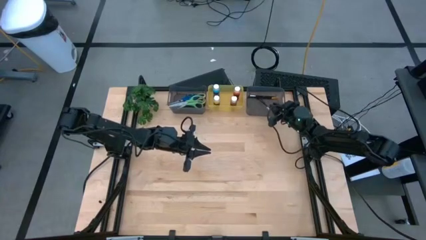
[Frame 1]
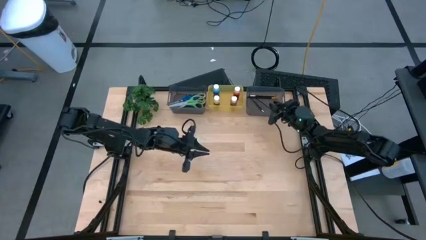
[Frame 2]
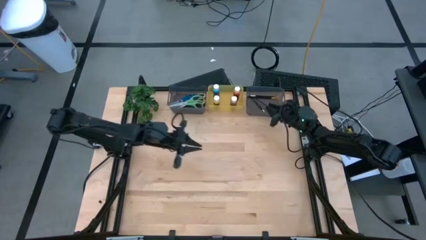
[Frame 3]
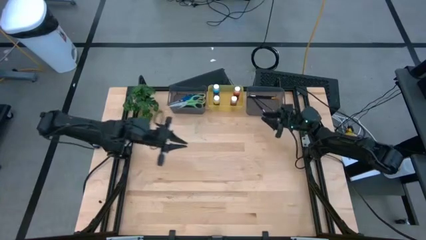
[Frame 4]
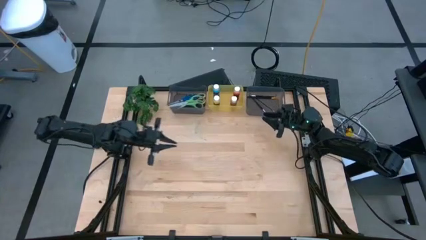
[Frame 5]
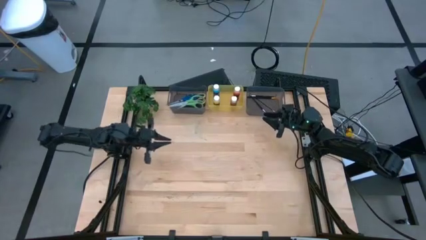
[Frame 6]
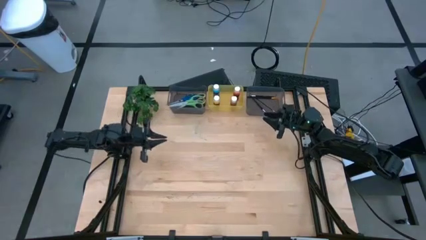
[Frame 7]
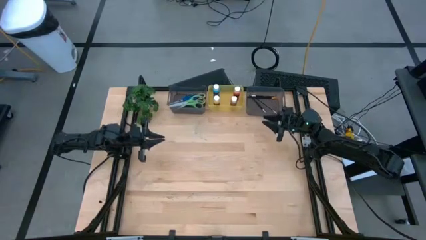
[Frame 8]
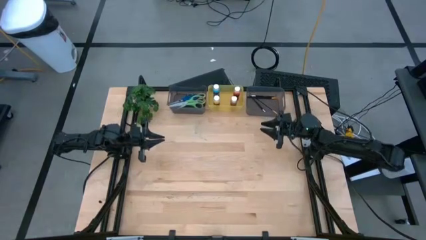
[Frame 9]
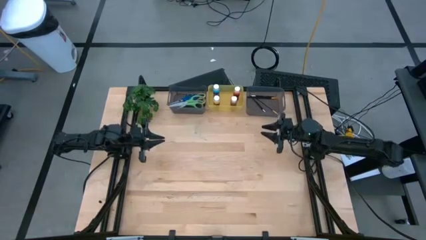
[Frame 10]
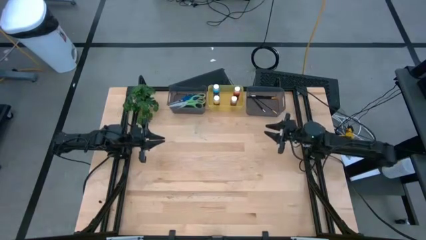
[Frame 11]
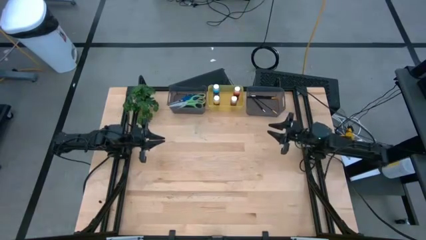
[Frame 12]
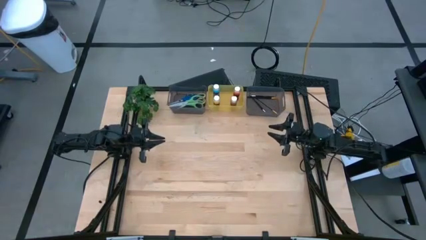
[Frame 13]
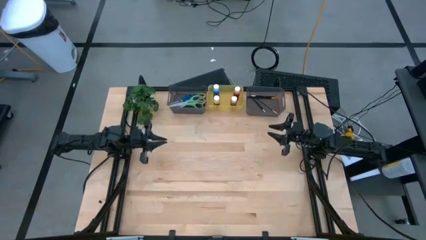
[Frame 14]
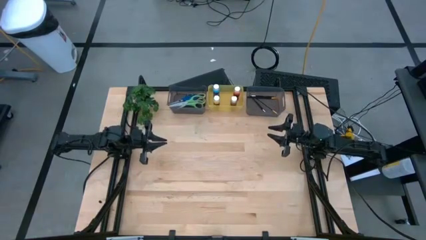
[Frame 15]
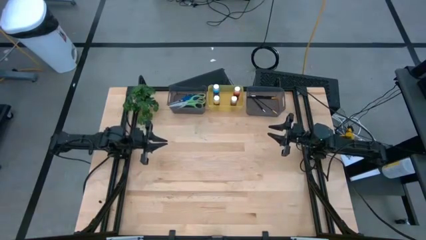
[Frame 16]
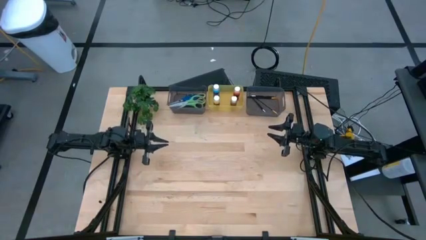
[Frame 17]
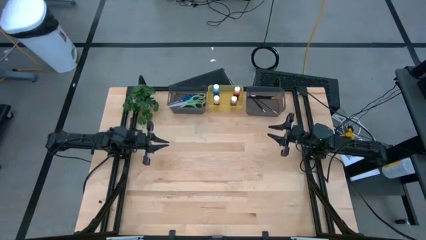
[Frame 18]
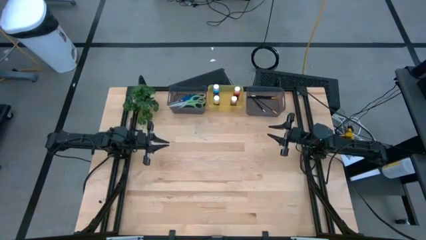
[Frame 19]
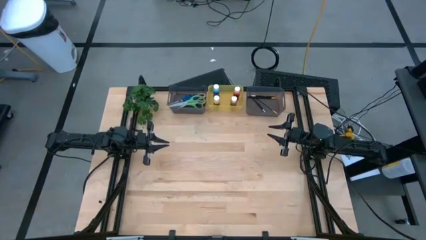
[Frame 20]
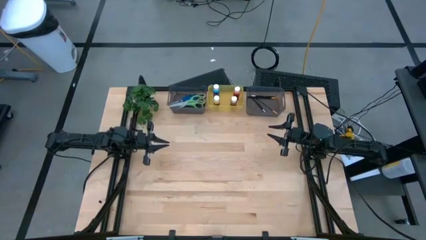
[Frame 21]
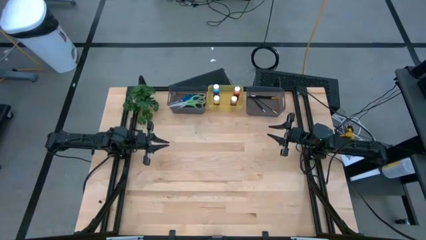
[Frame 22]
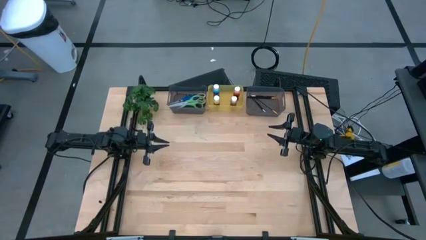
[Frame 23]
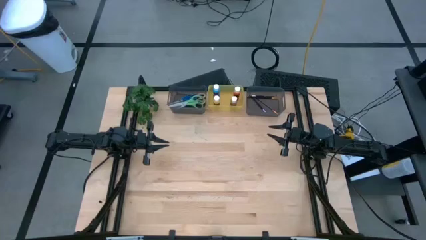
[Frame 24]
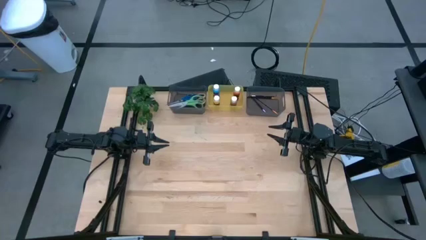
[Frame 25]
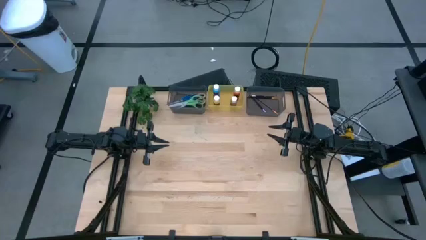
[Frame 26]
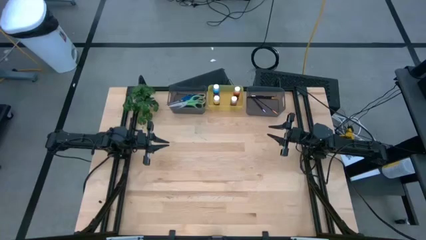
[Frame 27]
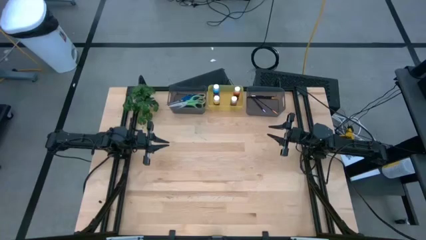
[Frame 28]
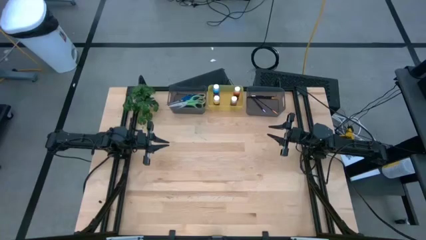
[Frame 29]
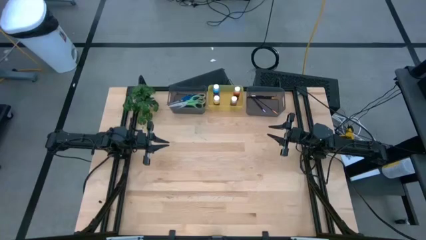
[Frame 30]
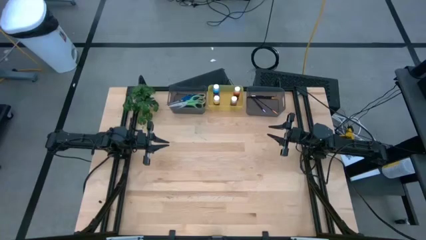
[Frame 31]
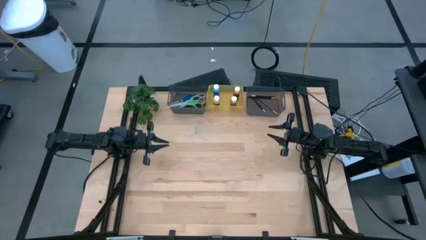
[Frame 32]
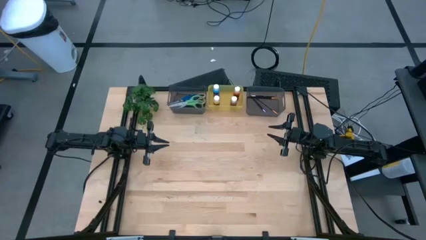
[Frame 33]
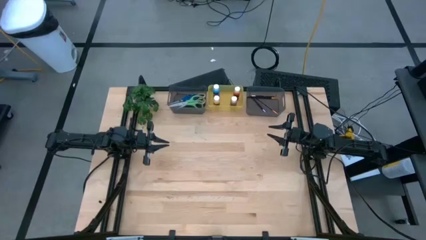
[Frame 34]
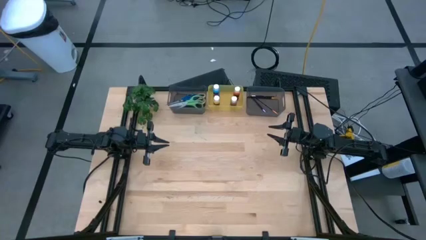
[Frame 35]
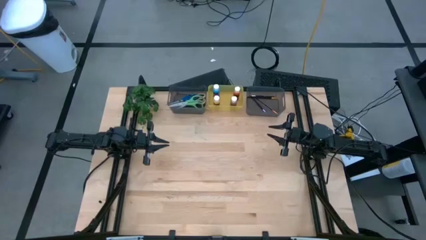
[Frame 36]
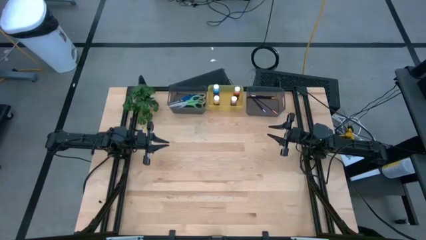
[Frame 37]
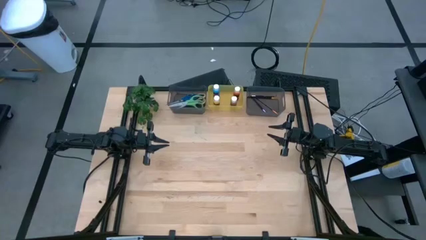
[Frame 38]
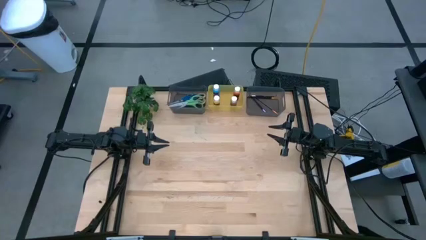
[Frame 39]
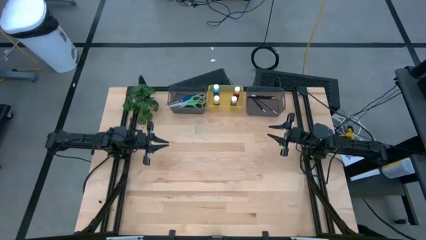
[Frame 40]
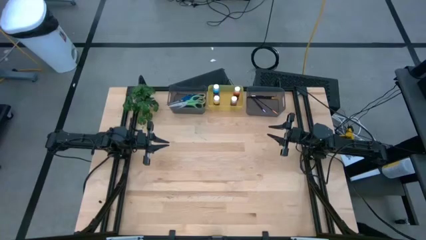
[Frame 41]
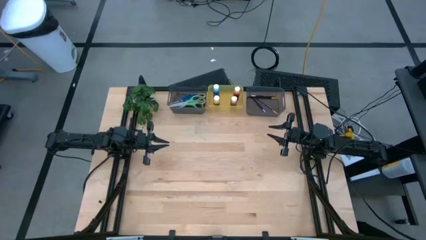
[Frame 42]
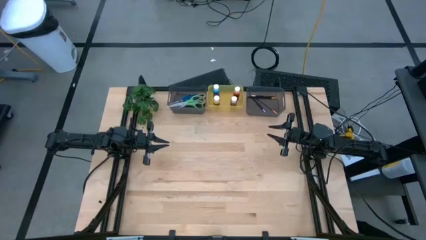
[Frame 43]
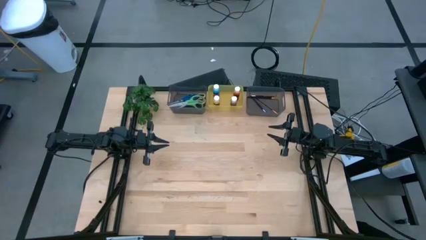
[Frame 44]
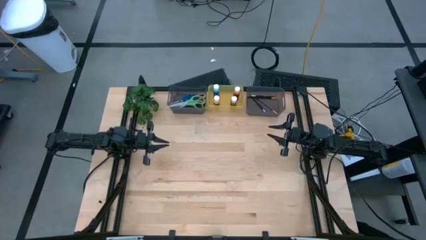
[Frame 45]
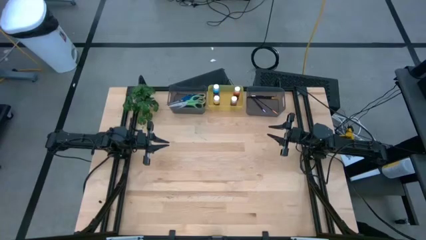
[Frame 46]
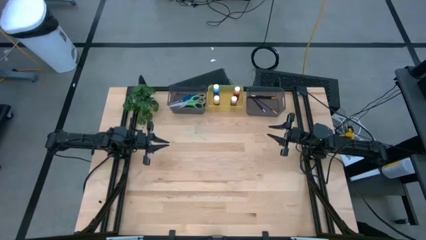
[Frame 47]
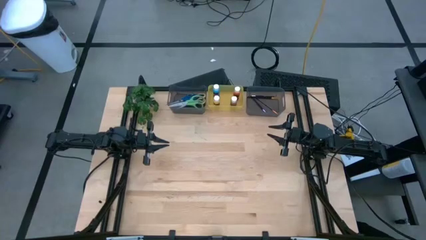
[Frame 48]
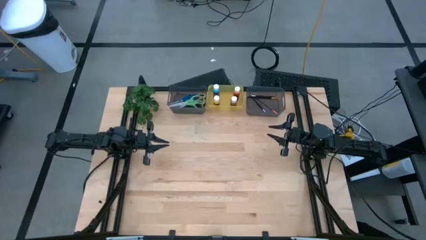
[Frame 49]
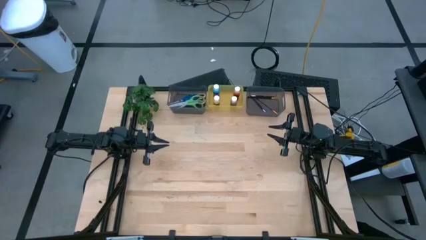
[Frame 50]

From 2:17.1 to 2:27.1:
Task: Pick & Place Paint Supplies
Return to Home Position

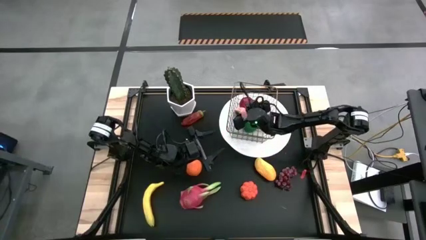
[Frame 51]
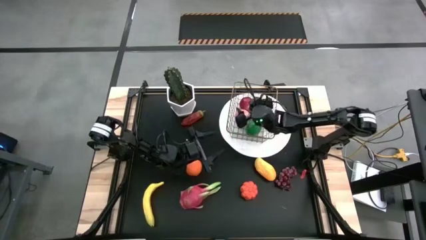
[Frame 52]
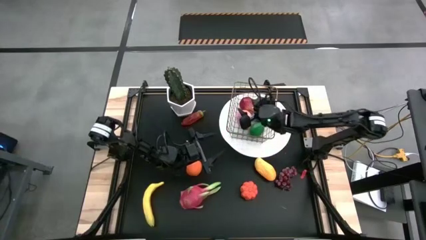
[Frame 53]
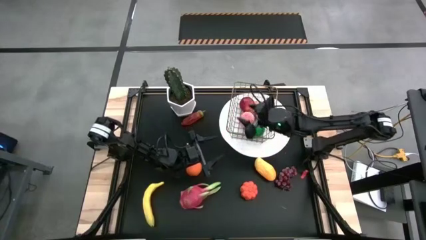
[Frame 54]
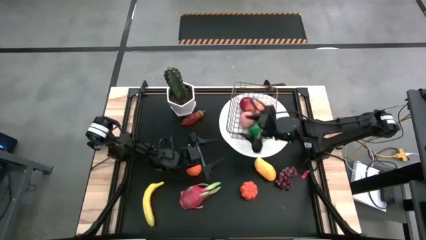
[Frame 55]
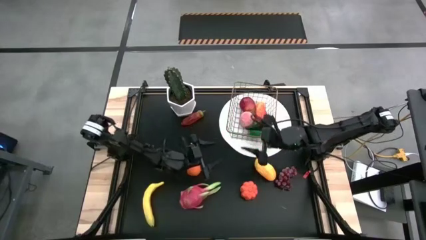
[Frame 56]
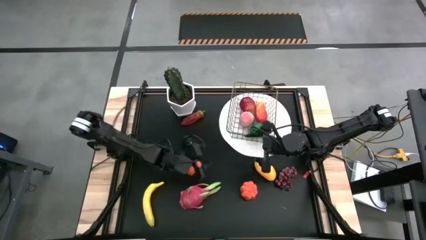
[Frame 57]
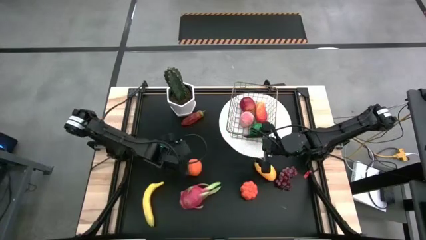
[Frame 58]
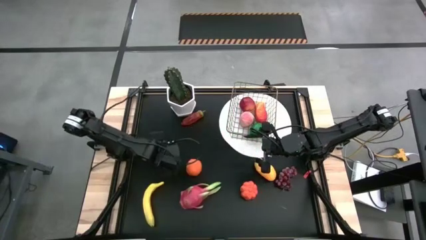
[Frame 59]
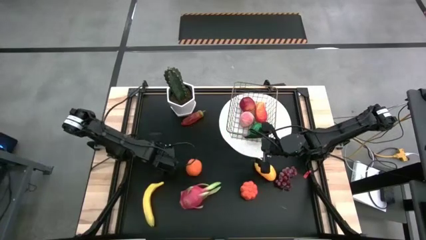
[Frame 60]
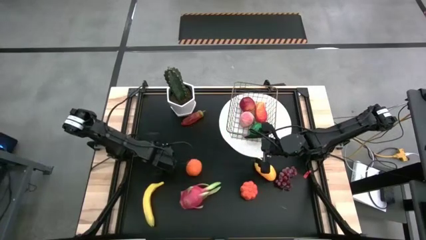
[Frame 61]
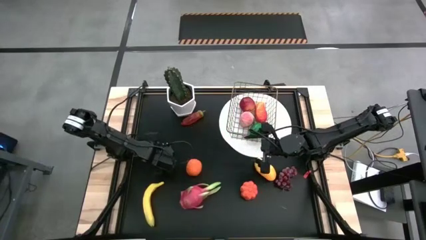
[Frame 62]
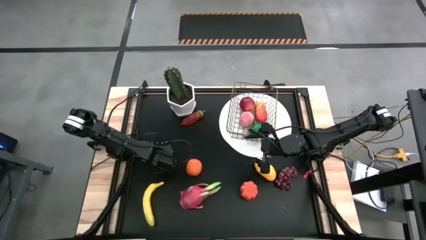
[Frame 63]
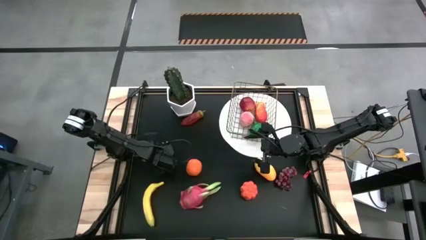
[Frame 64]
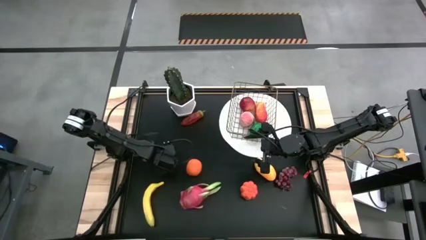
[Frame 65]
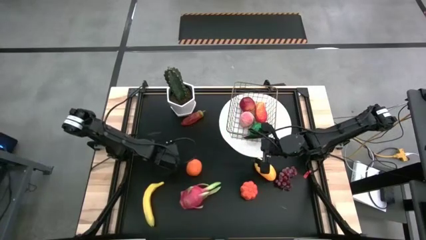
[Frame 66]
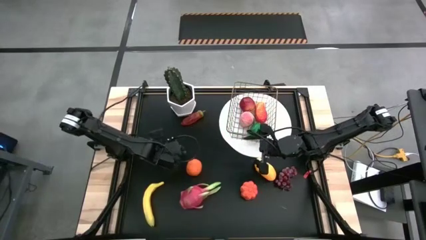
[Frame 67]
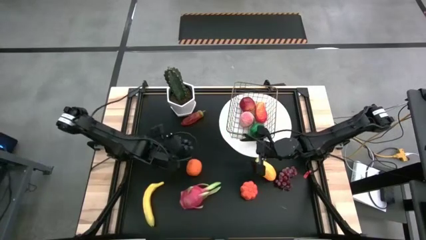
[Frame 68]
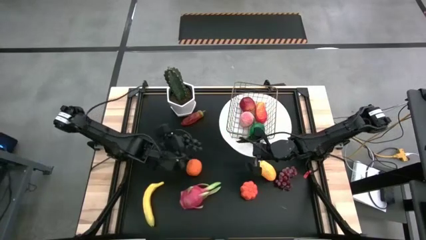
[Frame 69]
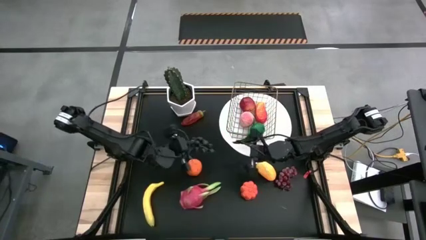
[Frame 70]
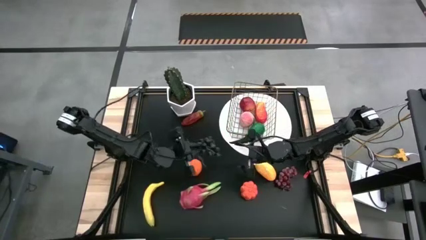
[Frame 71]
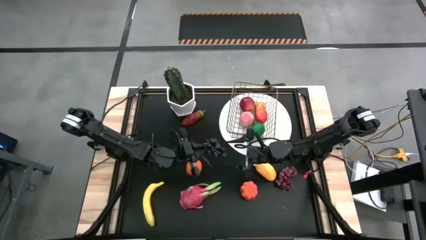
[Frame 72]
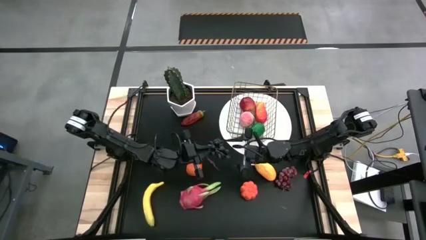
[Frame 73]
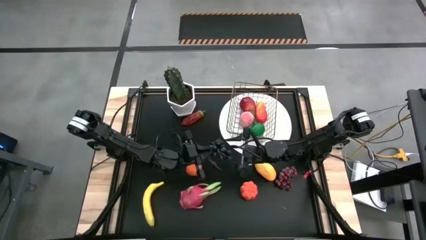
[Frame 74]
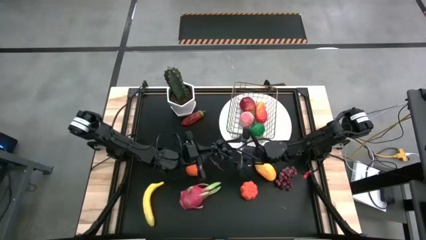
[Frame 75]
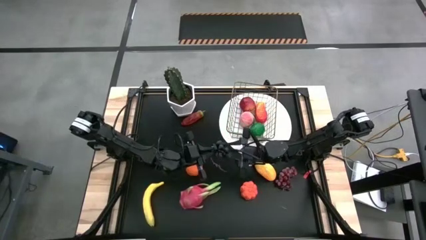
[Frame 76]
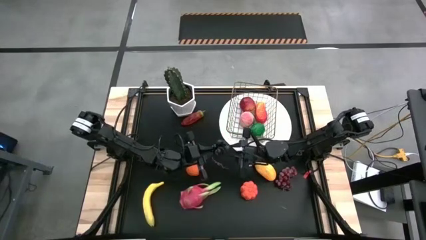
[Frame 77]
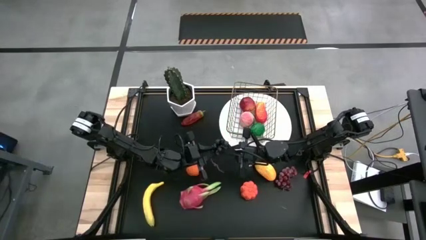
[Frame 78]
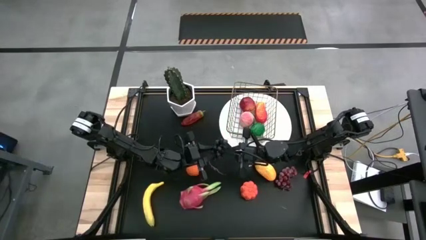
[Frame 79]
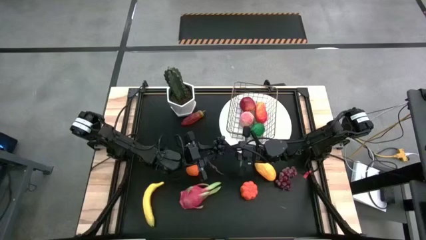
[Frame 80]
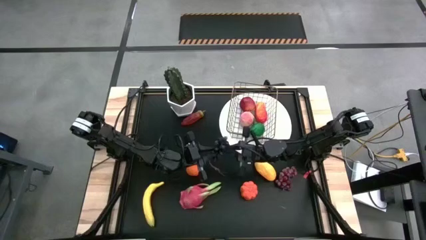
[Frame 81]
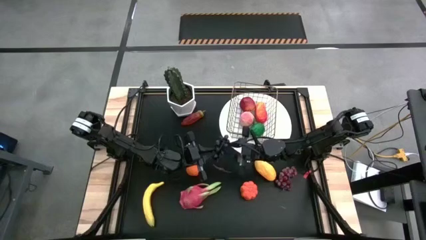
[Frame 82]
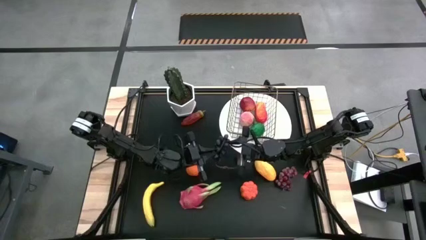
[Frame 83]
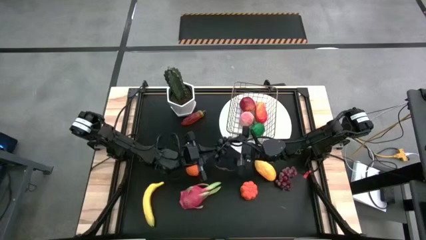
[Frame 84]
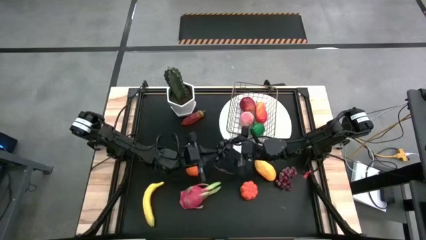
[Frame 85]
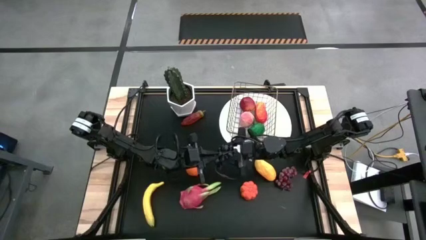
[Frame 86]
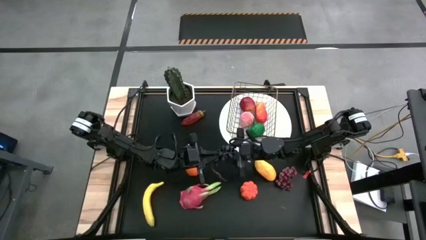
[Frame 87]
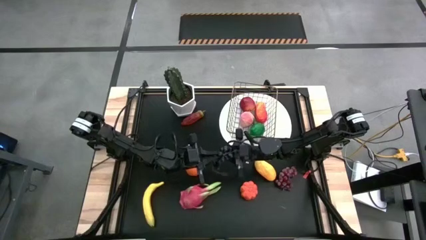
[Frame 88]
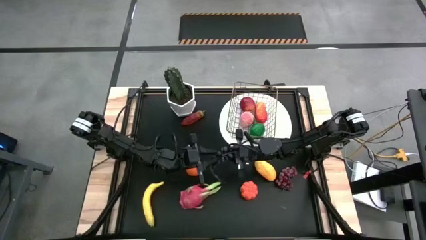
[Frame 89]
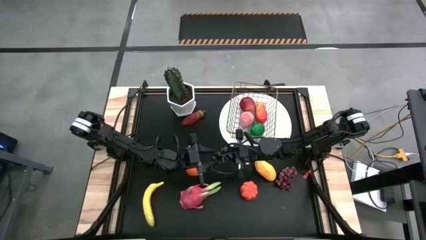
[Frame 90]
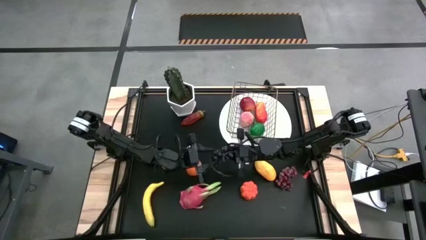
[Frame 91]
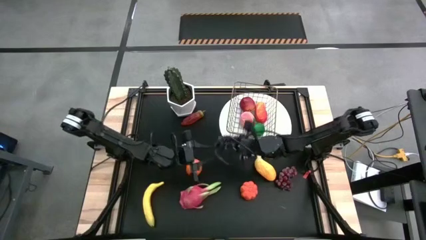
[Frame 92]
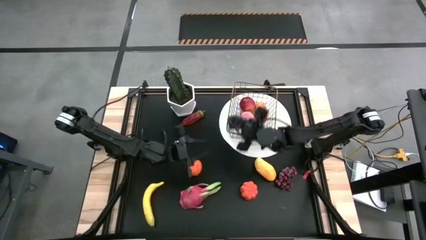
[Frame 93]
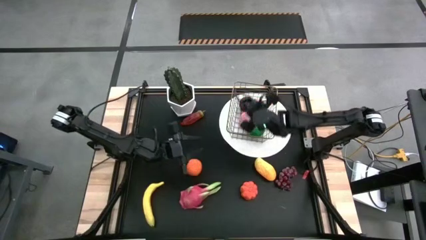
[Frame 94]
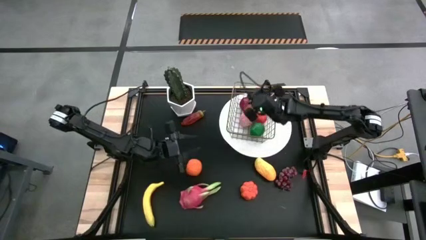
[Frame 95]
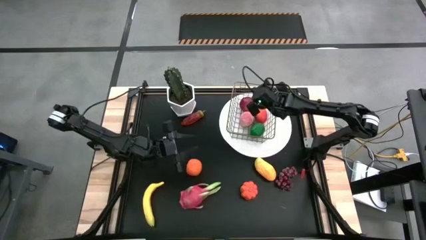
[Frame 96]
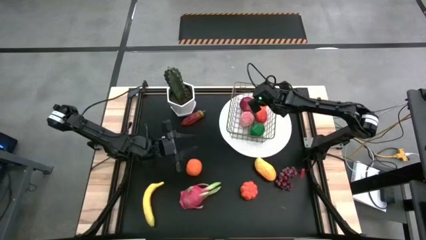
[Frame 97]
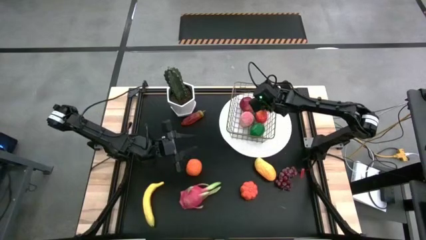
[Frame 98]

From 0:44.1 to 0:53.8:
Task: Build produce basket
Put the black grapes into the wire basket
